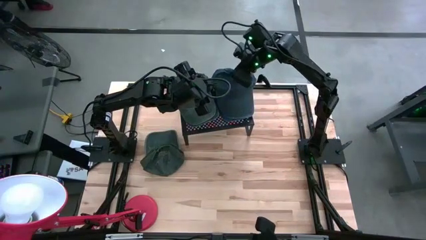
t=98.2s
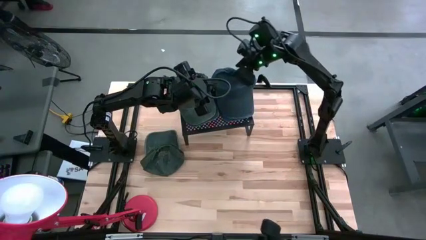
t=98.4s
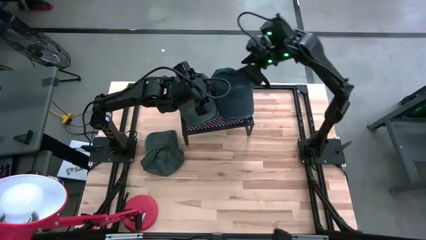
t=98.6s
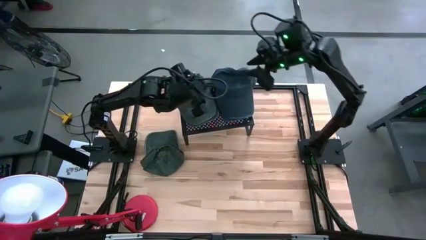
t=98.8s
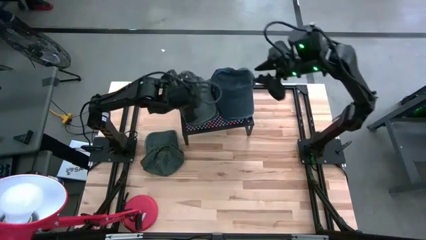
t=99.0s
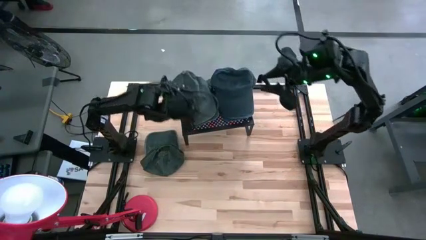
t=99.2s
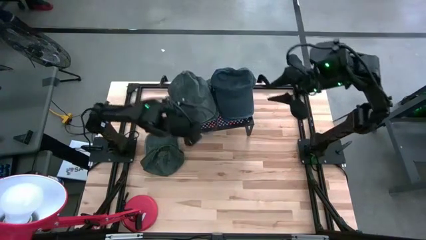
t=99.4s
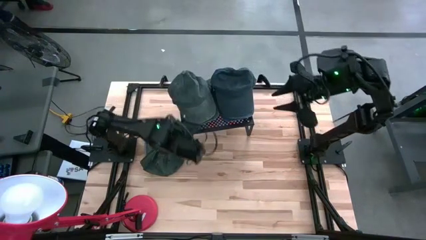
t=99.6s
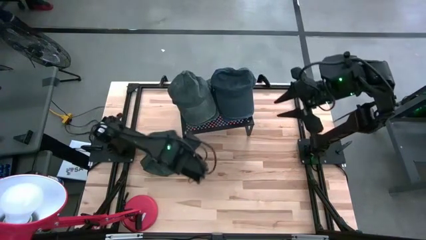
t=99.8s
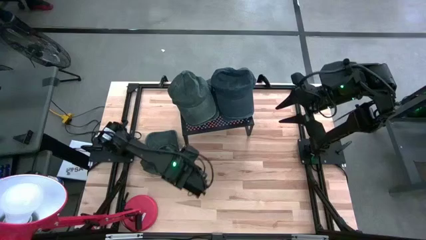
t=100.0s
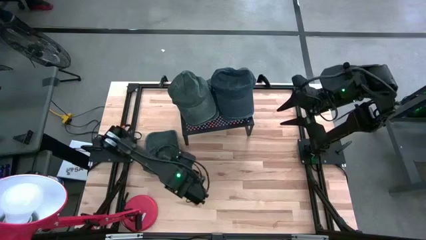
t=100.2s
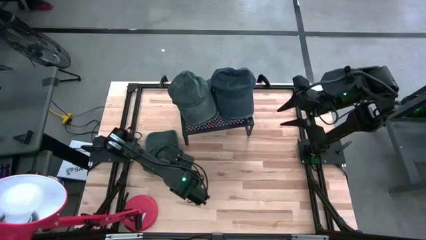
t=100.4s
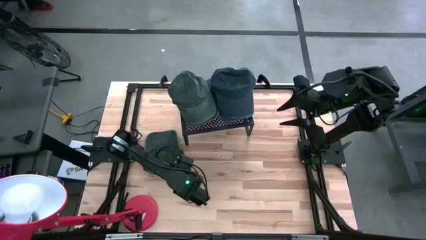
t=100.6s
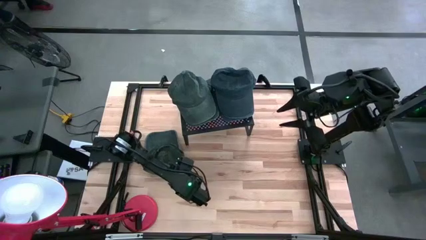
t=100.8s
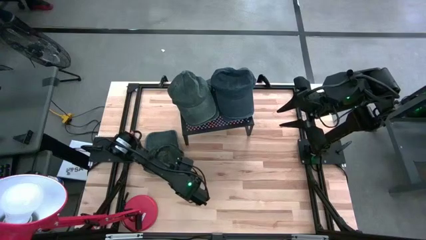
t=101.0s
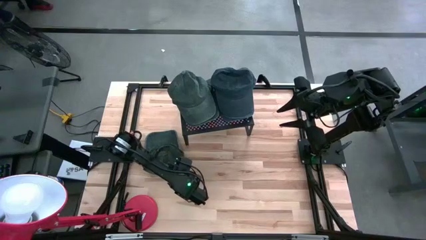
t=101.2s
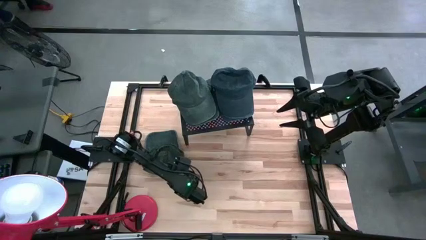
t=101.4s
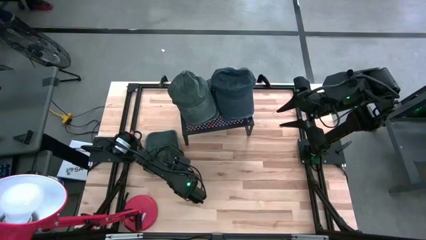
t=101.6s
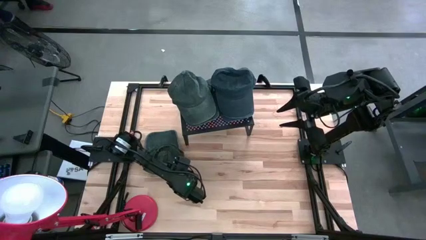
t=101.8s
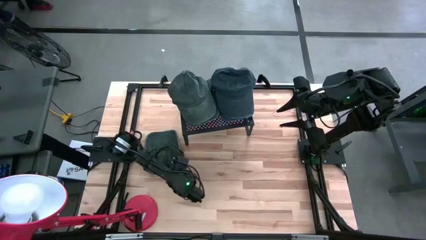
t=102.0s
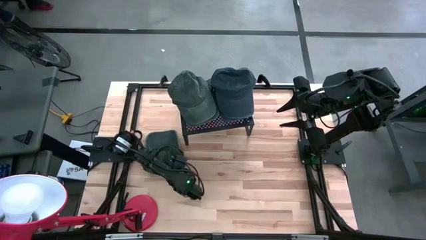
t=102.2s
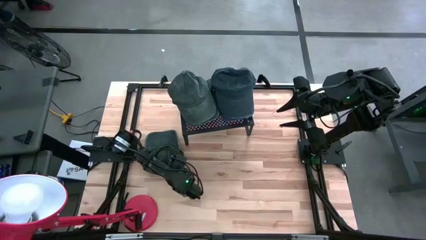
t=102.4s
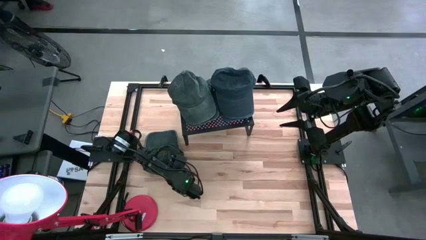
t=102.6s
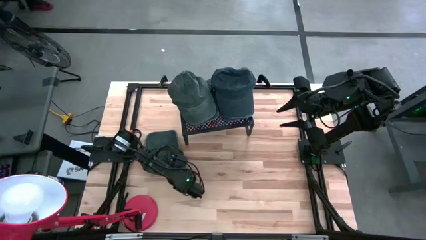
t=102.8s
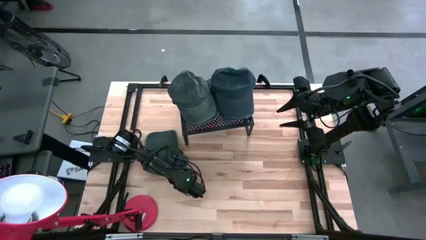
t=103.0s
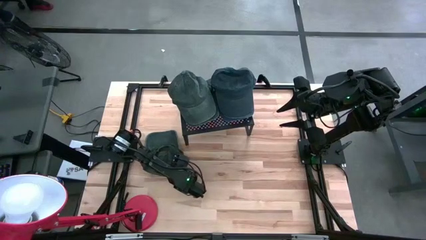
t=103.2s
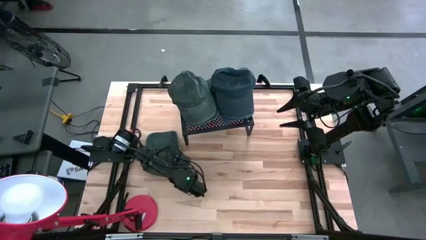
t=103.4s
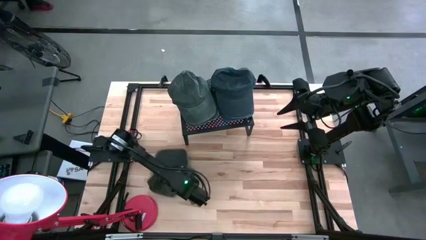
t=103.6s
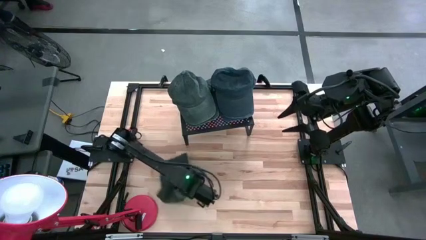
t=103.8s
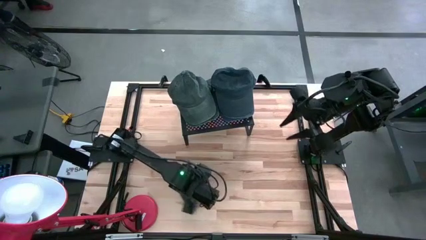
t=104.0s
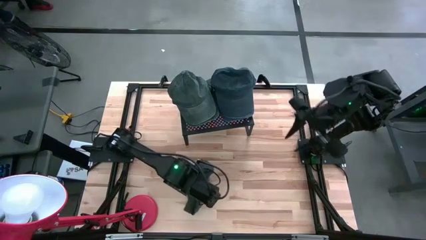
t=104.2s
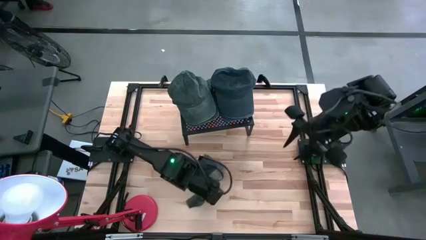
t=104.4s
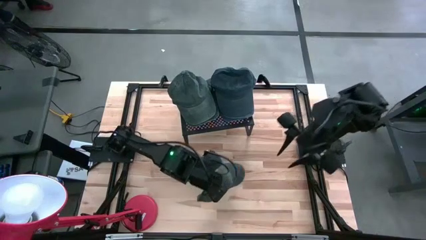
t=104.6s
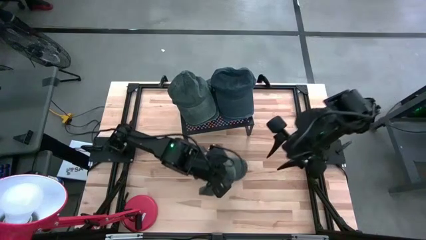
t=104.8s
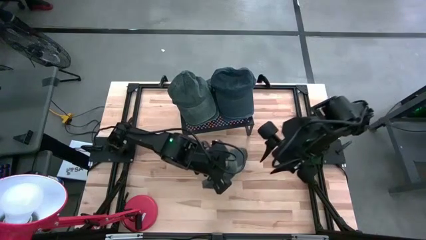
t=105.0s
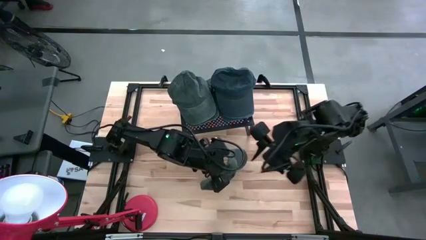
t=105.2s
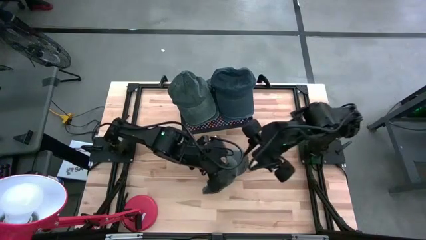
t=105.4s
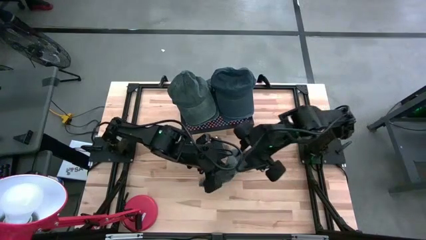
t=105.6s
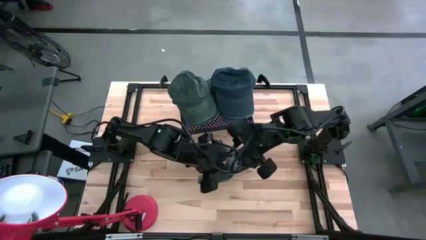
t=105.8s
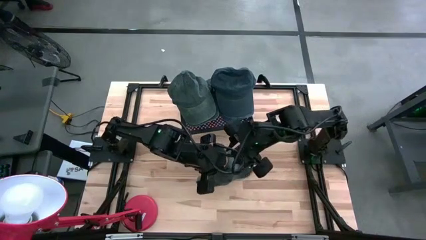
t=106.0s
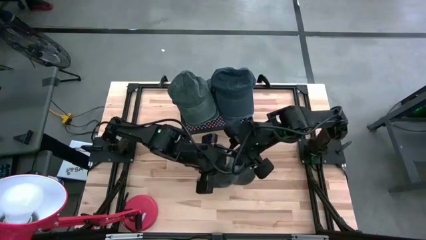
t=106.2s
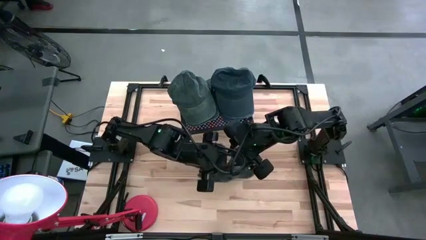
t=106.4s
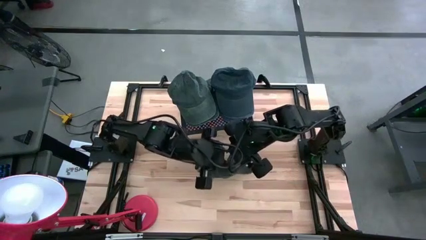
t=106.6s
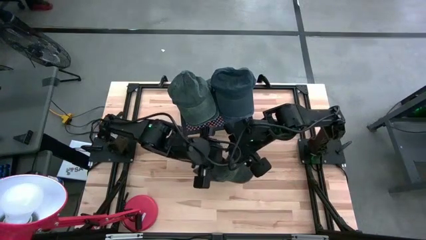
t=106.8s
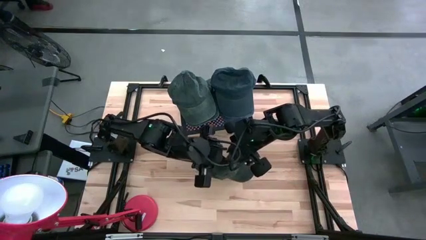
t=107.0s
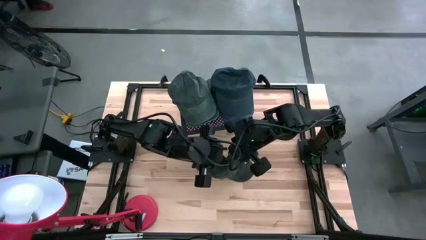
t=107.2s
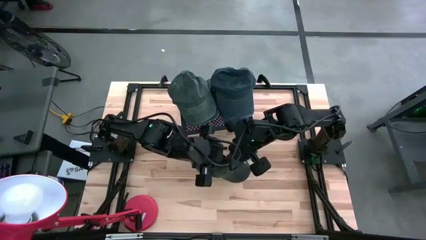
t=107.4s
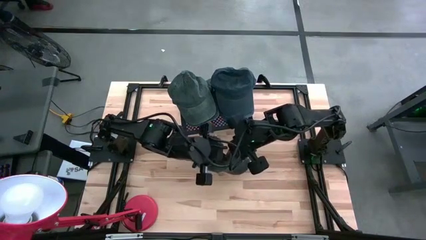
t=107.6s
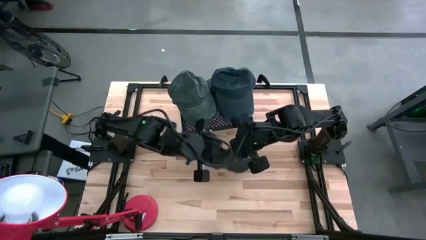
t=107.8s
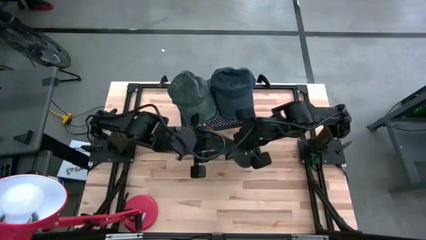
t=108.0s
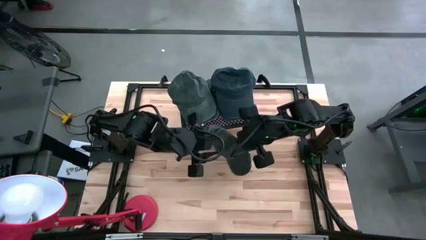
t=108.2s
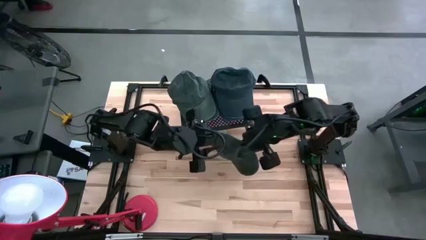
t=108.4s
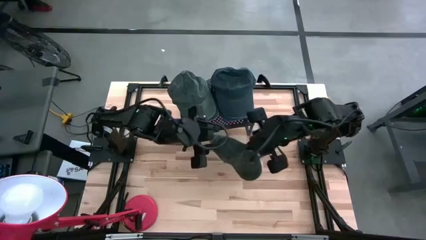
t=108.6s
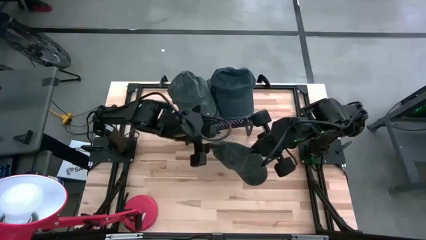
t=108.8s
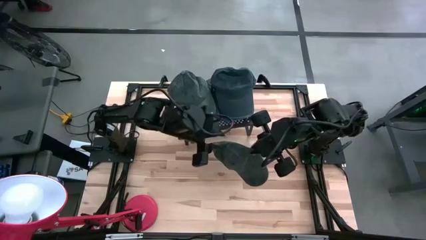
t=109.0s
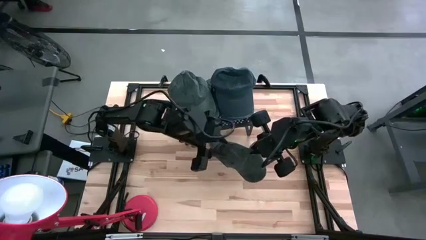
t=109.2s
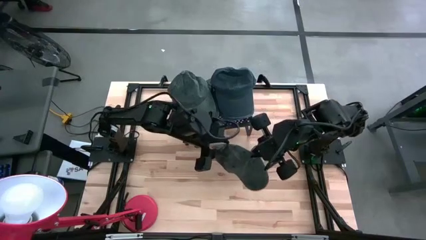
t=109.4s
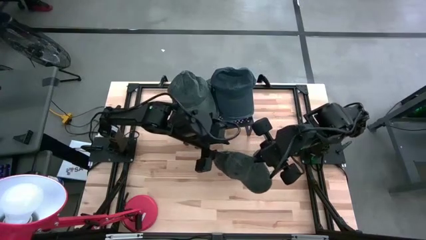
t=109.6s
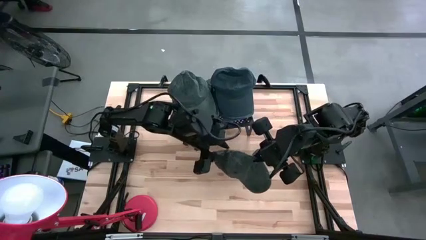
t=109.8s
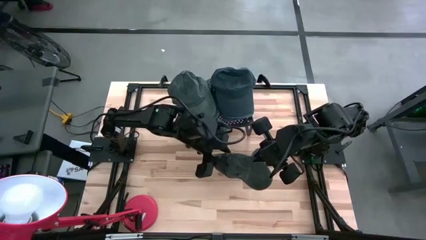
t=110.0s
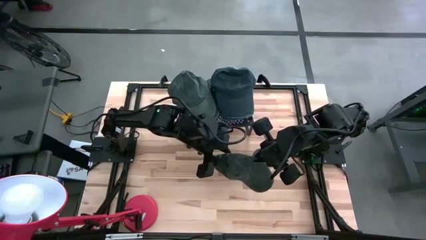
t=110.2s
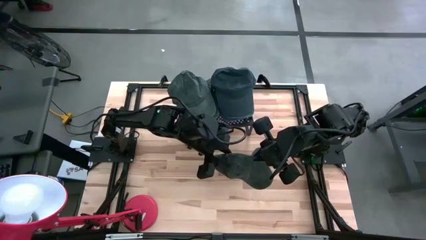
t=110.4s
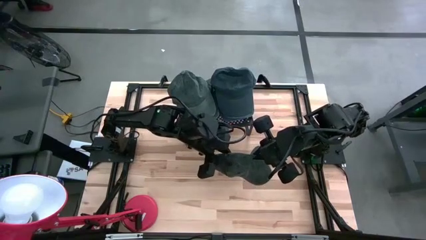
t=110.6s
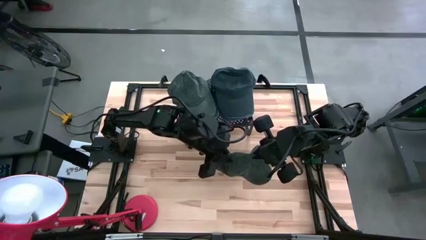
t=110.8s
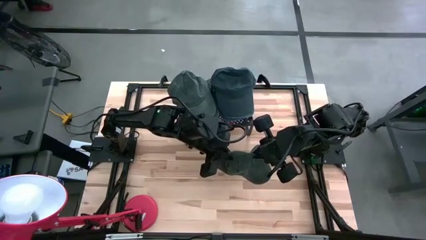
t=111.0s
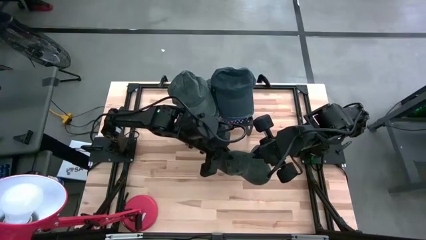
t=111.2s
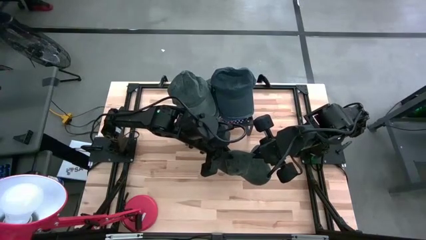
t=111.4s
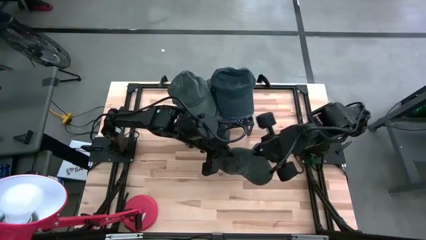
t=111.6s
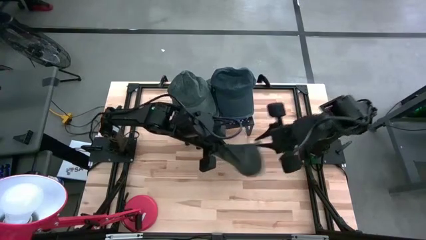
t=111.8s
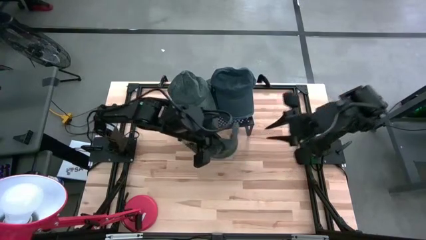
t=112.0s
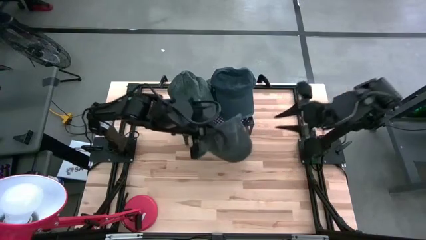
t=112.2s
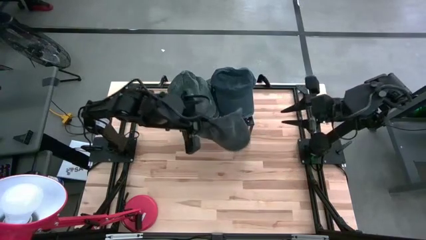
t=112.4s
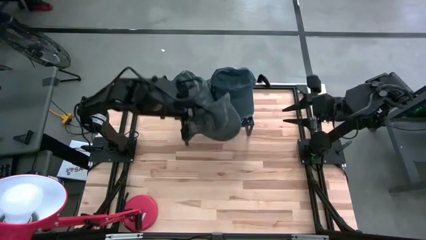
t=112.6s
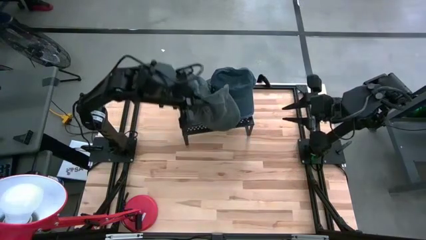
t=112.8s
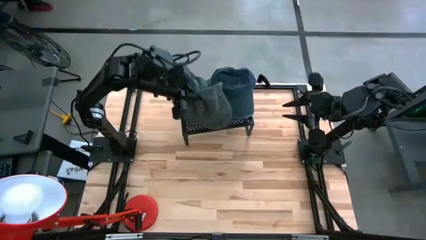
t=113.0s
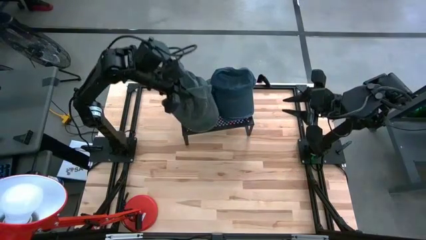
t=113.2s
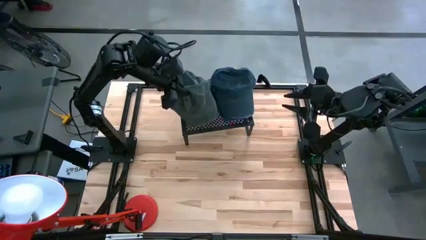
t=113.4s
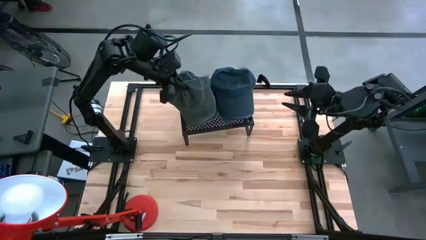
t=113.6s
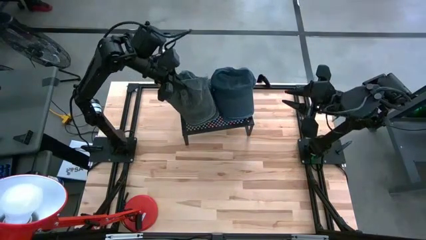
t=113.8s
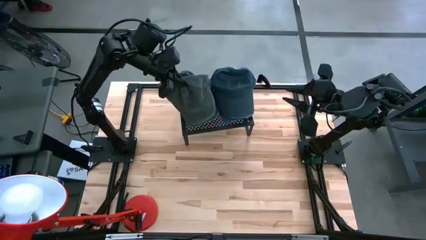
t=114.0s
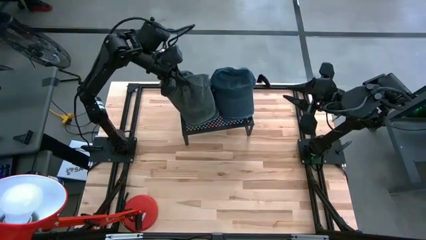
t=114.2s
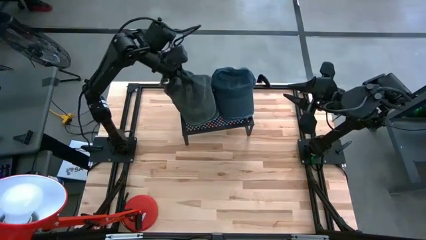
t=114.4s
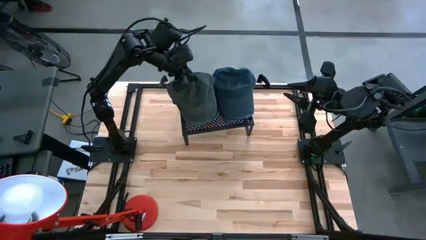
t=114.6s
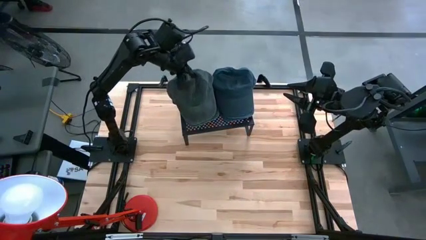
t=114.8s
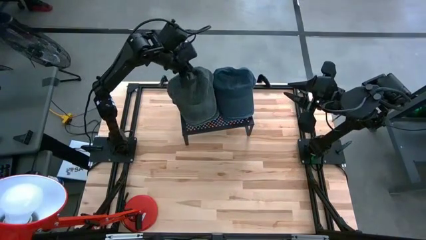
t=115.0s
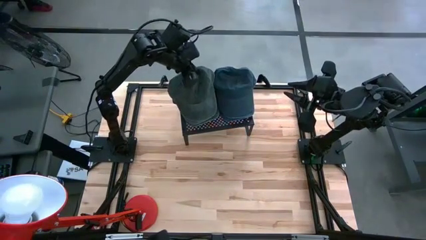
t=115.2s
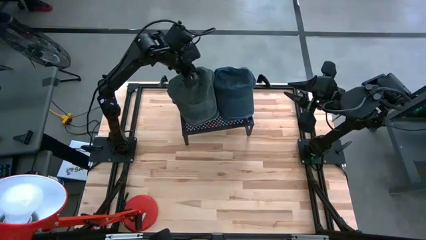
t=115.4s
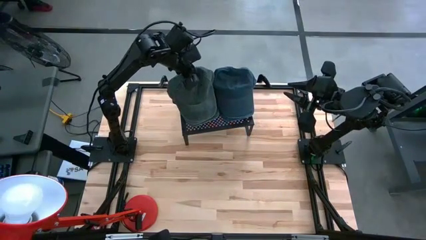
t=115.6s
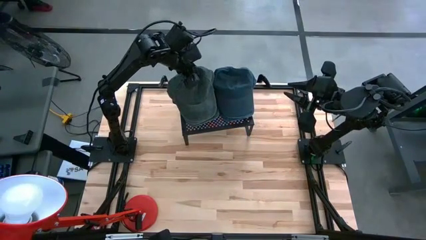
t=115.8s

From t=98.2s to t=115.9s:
Task: Pick & Place hat
Stack the dark green cap on top of the dark green cap on the shelf
